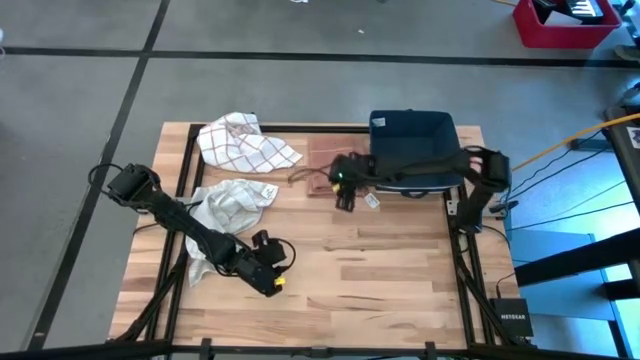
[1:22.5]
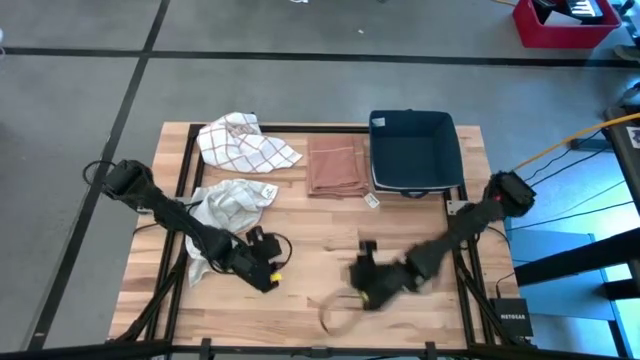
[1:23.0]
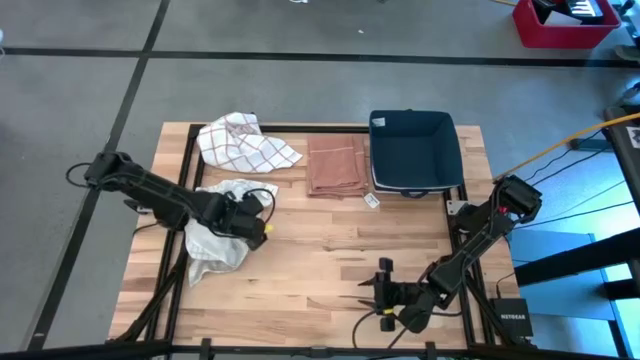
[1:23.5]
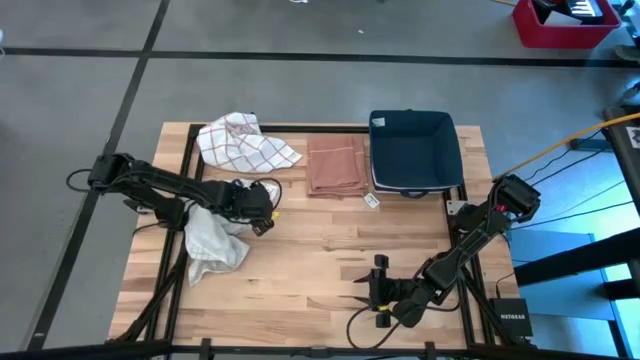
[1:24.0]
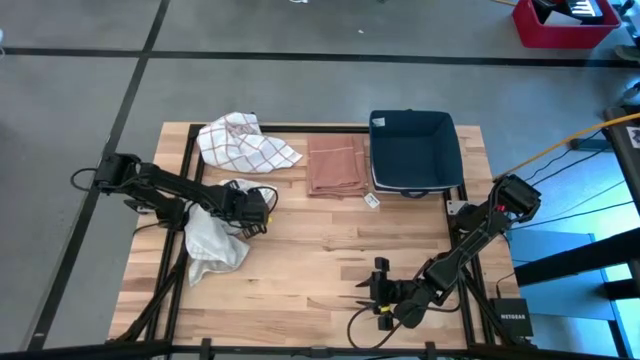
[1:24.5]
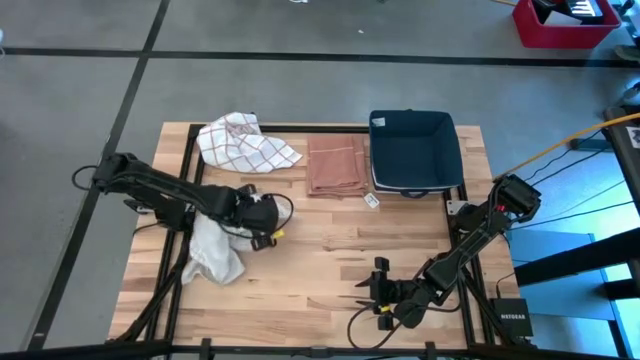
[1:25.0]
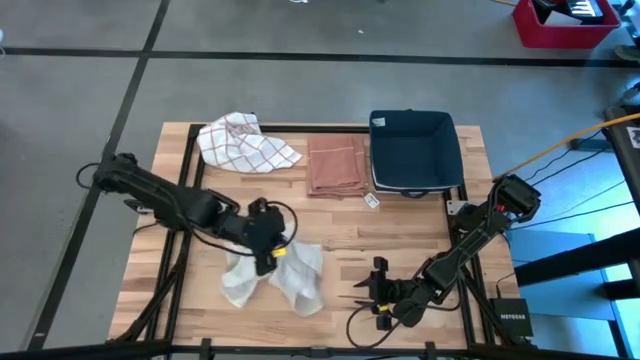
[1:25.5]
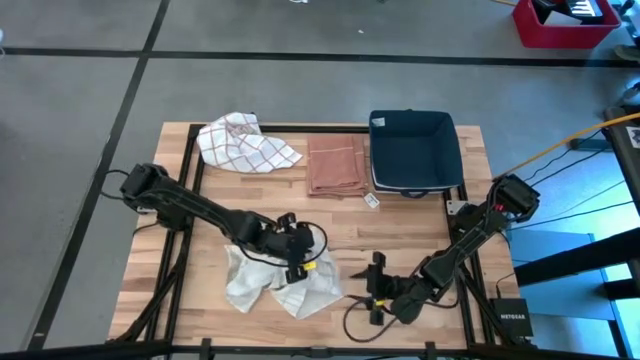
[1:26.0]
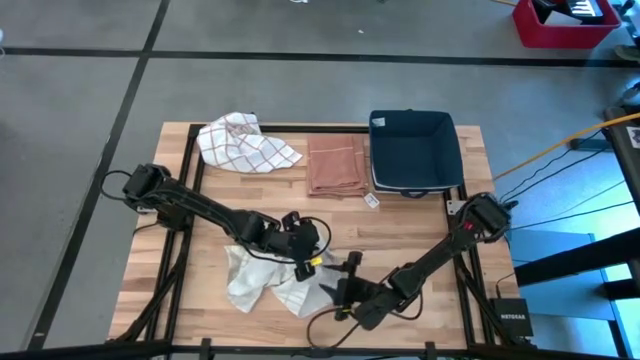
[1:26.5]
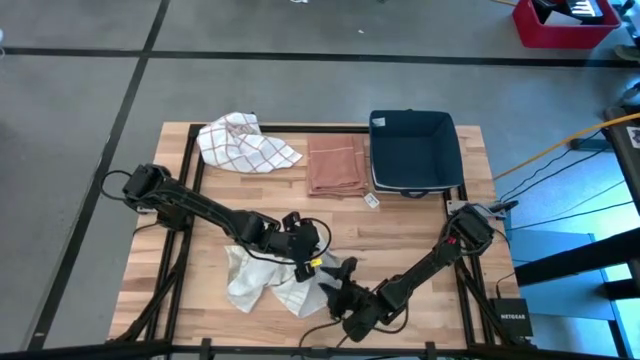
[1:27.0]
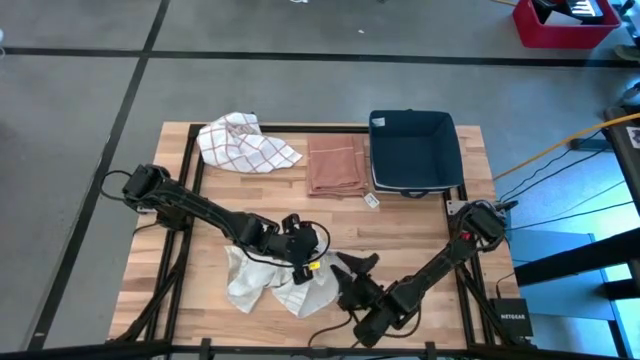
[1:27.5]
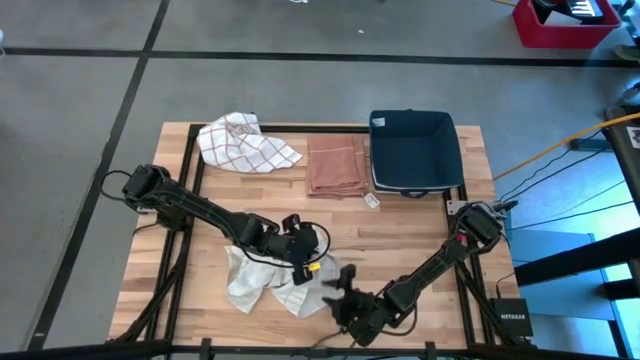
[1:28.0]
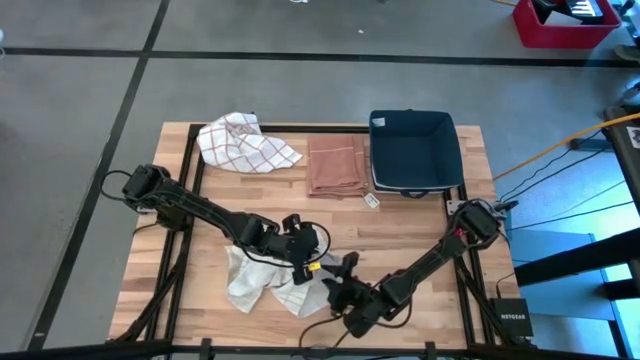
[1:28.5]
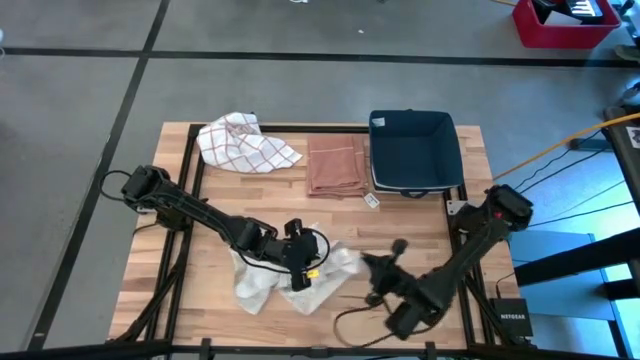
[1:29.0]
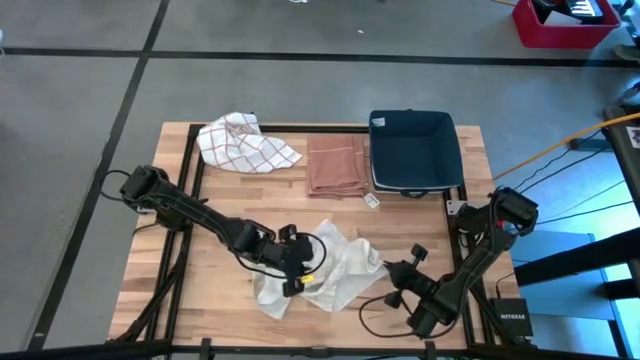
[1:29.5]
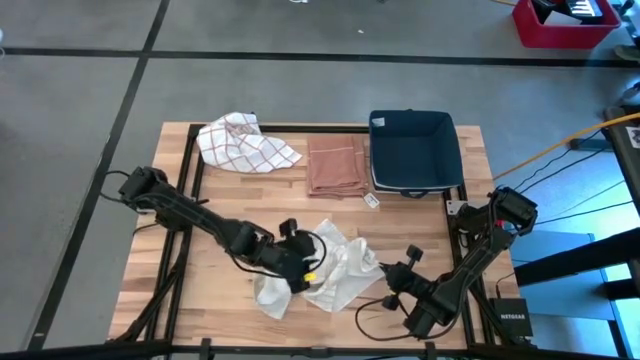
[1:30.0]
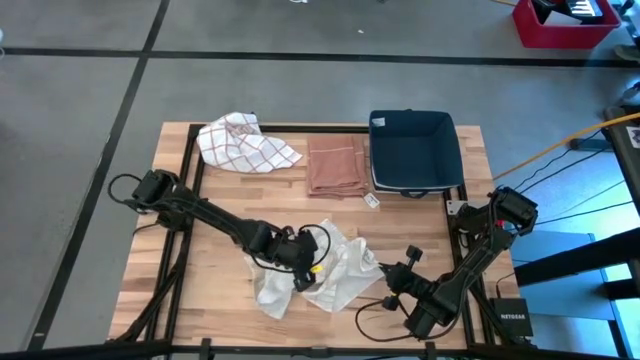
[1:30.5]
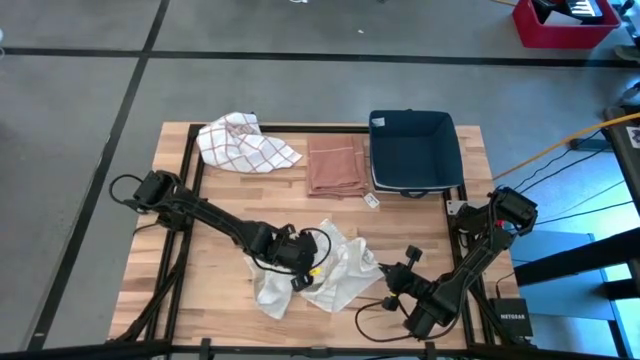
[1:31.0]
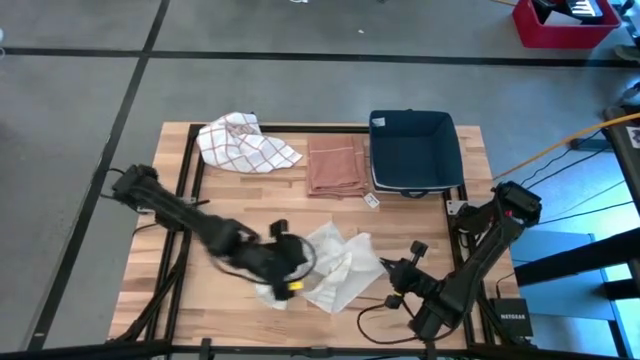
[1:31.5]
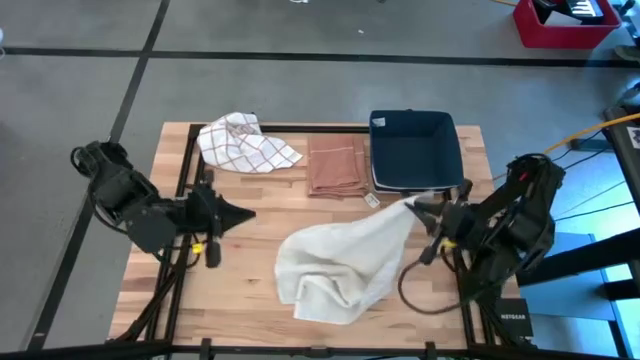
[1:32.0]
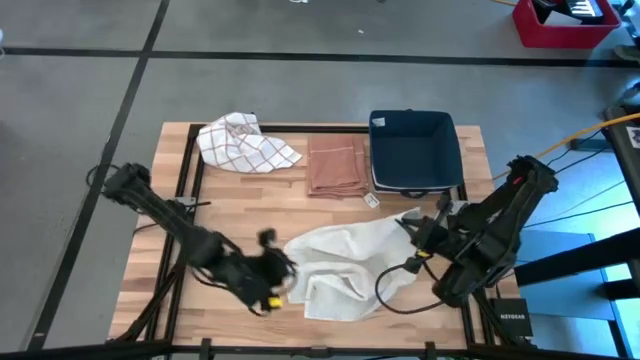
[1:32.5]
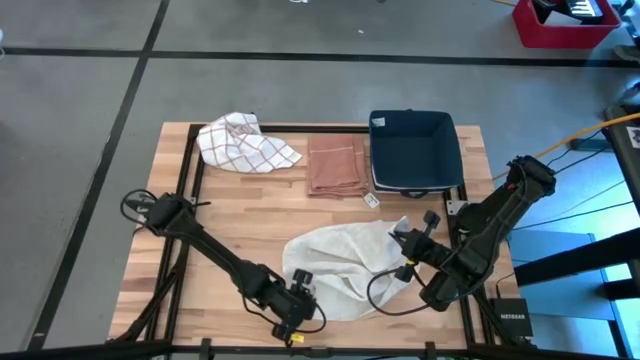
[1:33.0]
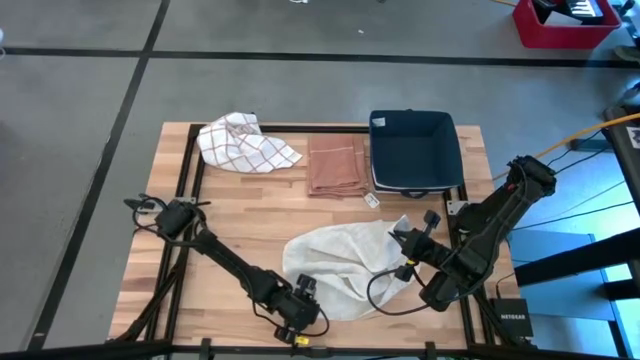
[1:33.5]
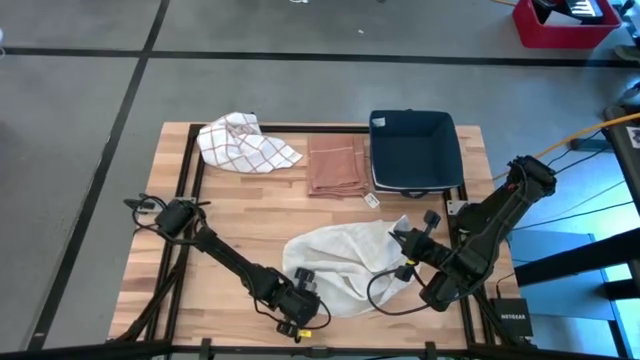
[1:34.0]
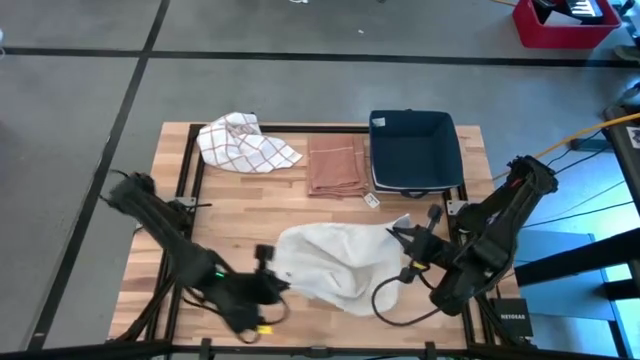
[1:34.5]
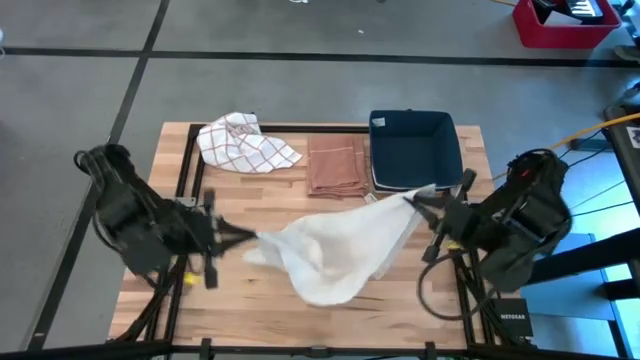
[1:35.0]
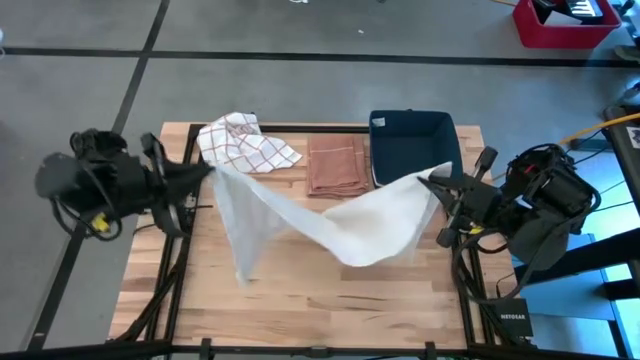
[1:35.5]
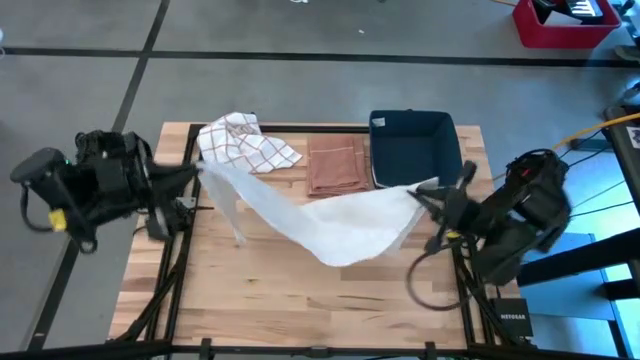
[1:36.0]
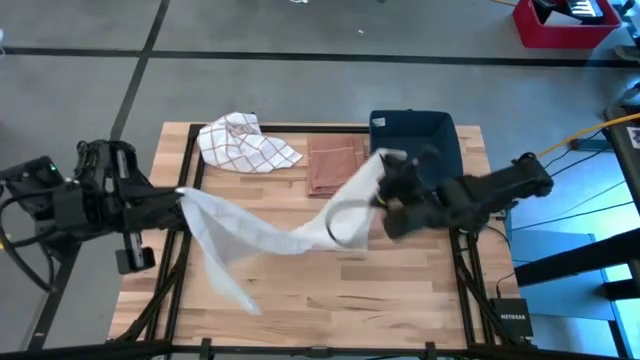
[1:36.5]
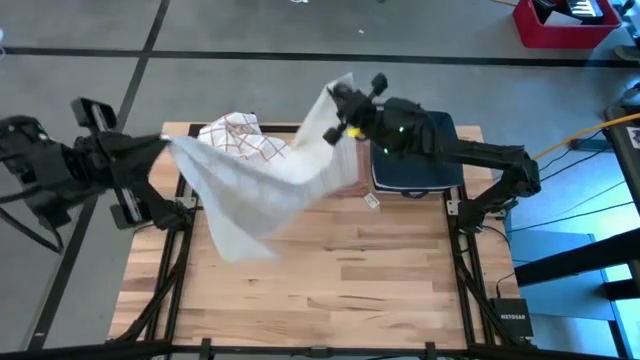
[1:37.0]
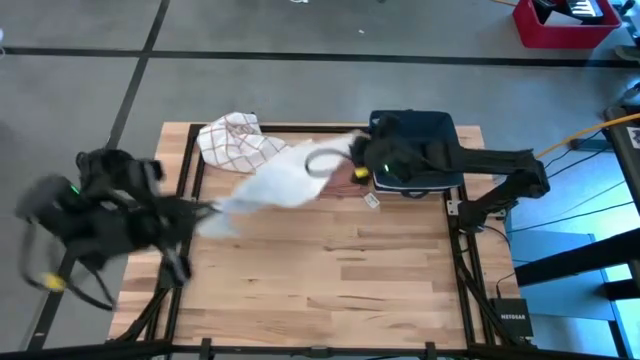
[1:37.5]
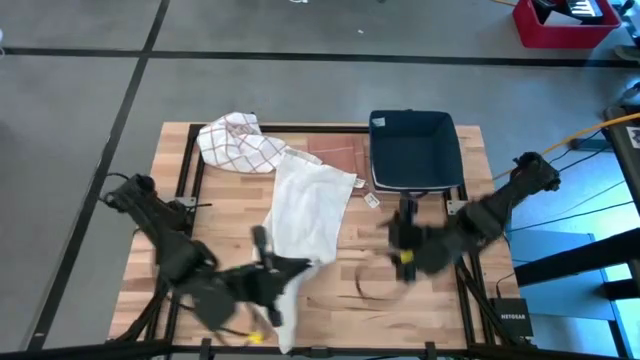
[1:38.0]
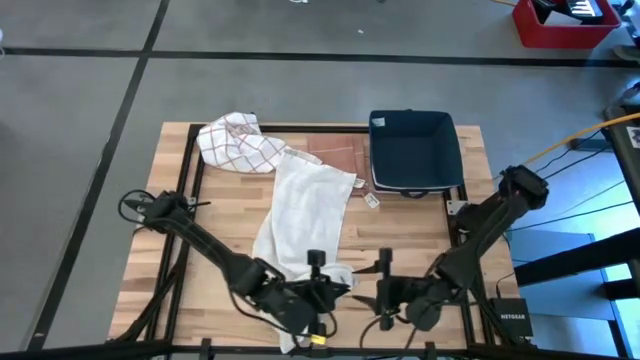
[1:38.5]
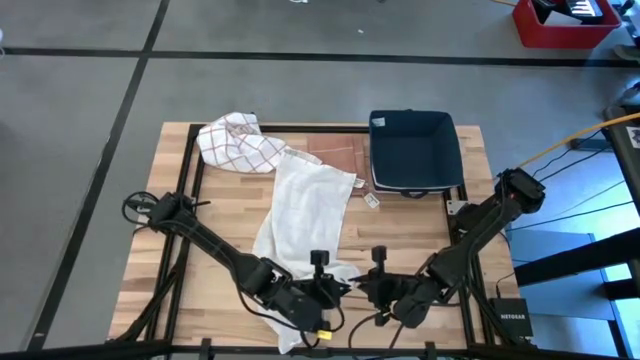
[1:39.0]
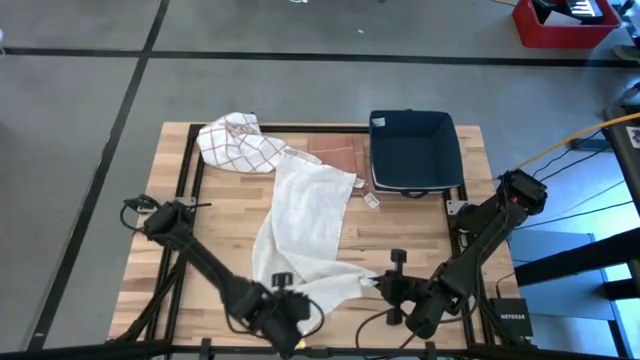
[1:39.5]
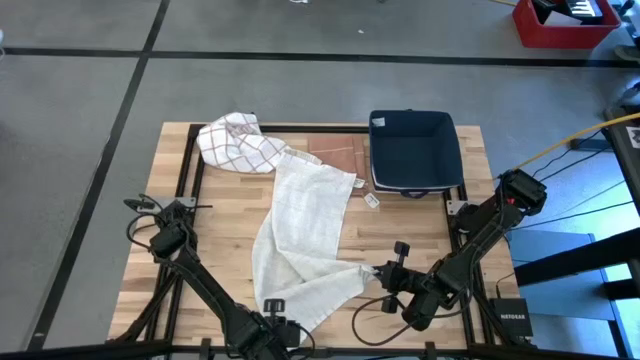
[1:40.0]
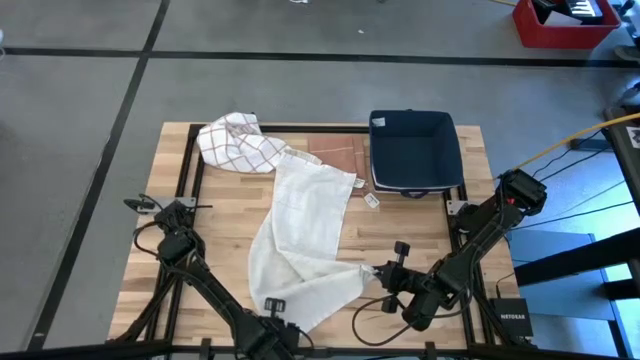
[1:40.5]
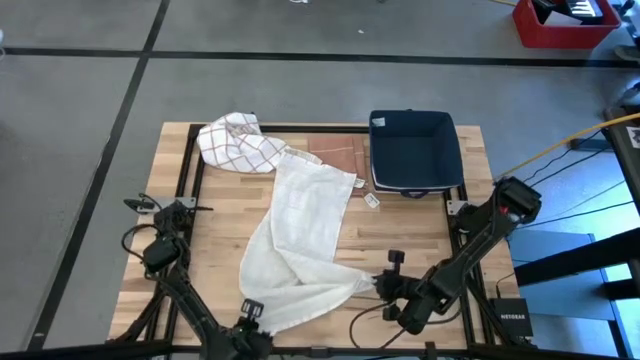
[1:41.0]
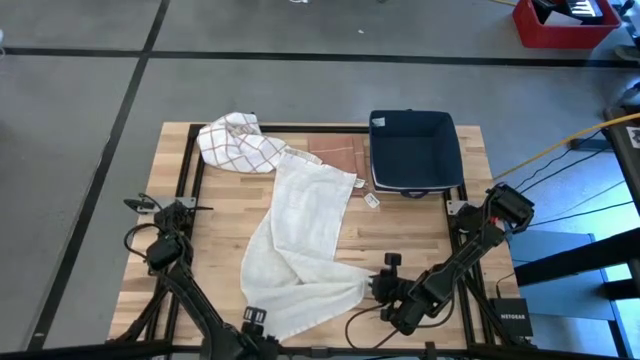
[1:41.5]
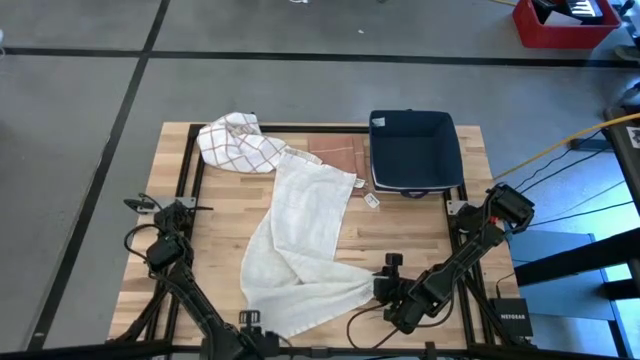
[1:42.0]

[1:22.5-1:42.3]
Task: Fold towel
Fold the bottom white towel

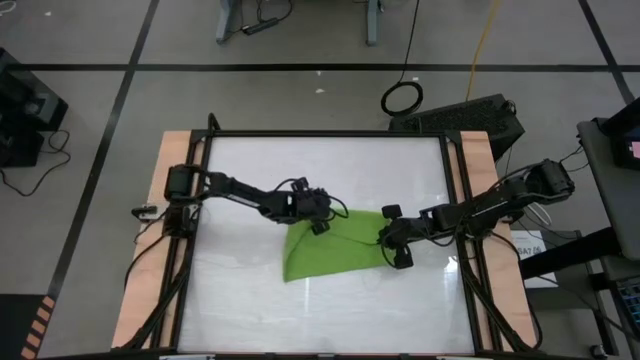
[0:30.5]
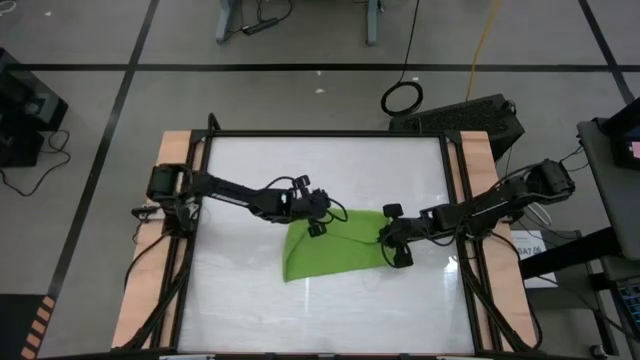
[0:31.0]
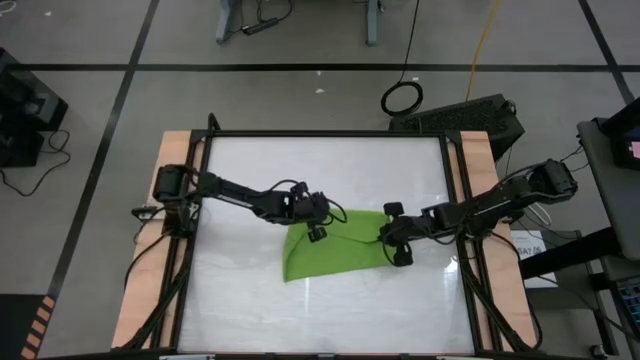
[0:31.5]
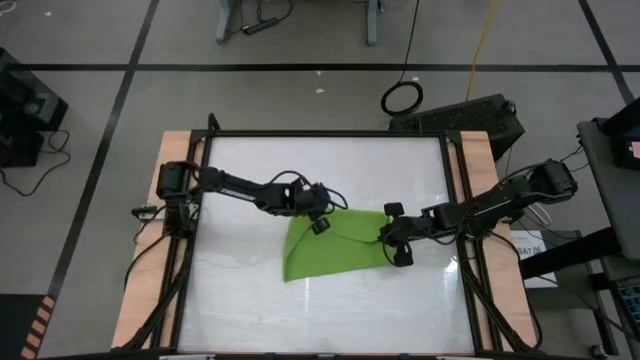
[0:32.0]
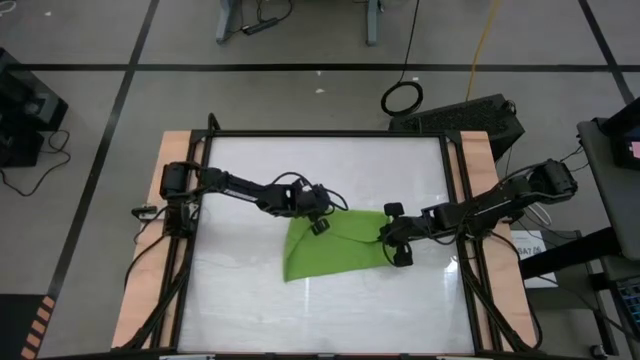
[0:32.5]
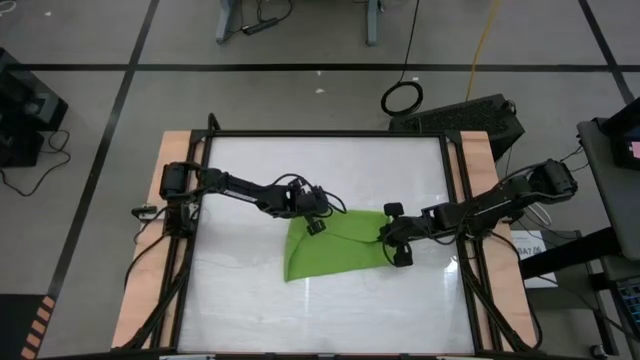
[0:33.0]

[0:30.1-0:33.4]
Task: Roll towel
Fold the green towel
